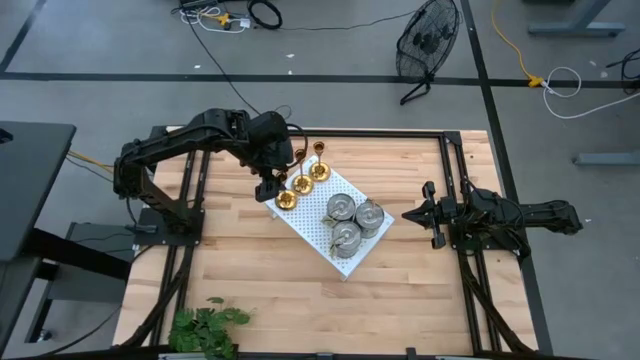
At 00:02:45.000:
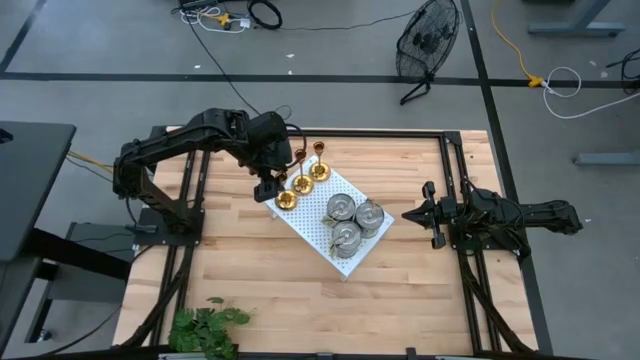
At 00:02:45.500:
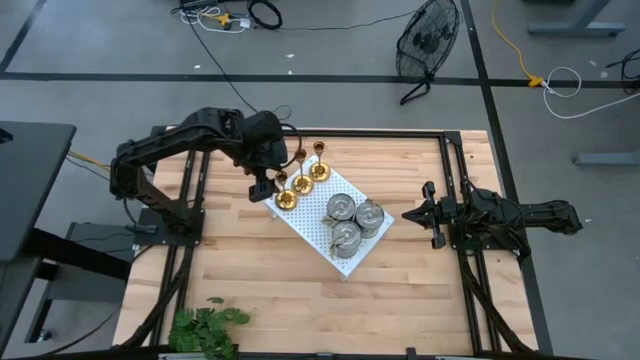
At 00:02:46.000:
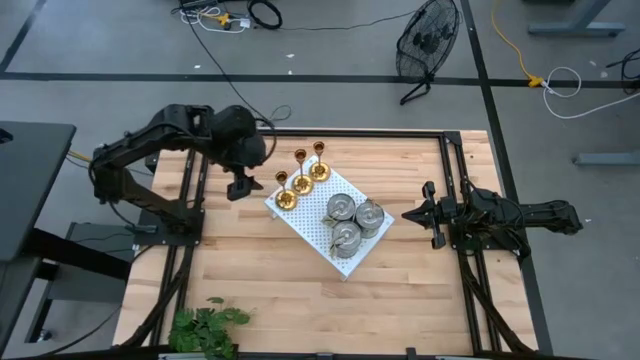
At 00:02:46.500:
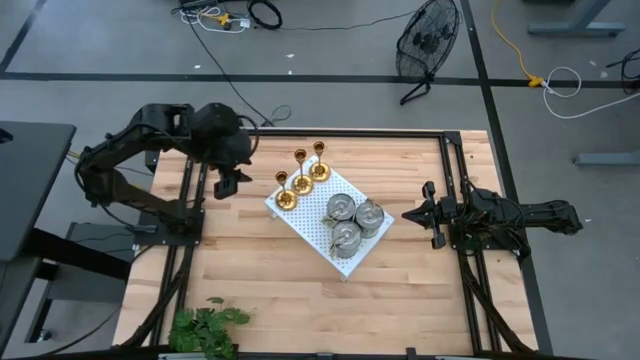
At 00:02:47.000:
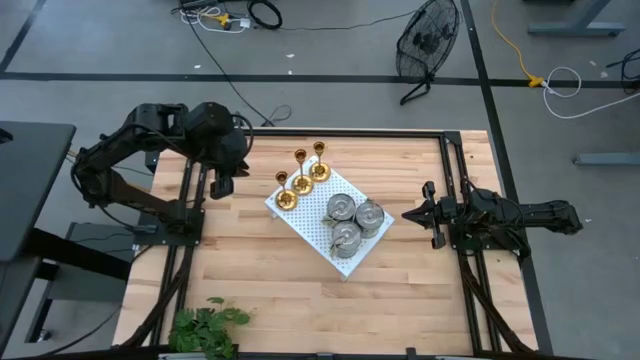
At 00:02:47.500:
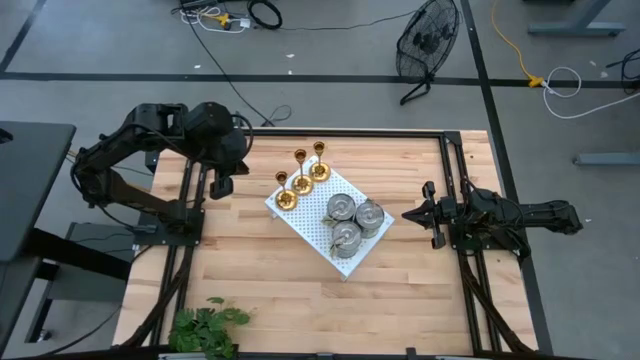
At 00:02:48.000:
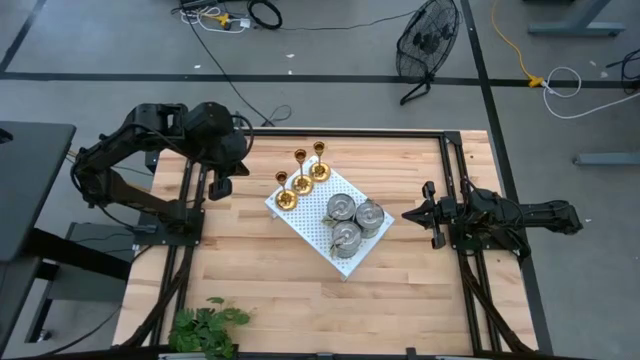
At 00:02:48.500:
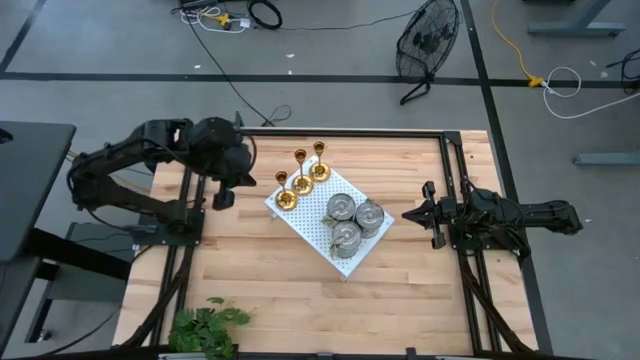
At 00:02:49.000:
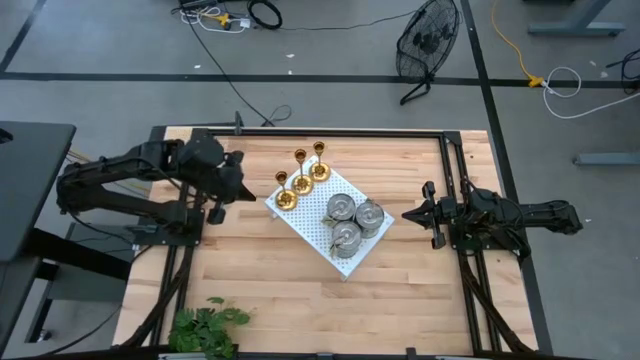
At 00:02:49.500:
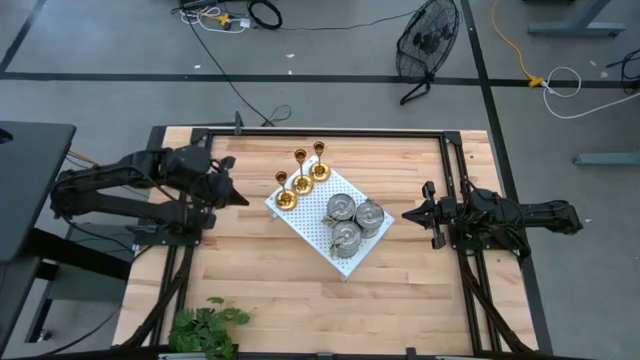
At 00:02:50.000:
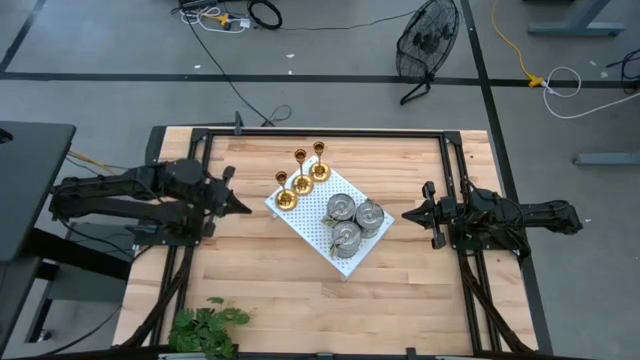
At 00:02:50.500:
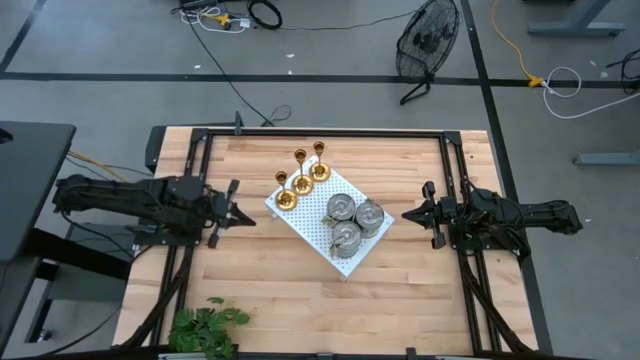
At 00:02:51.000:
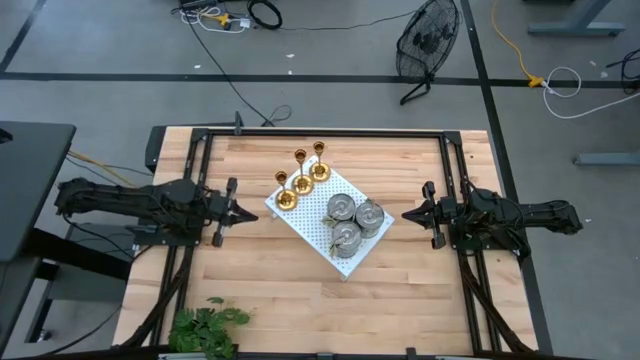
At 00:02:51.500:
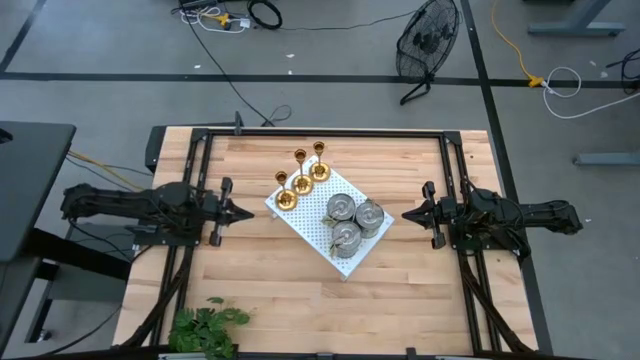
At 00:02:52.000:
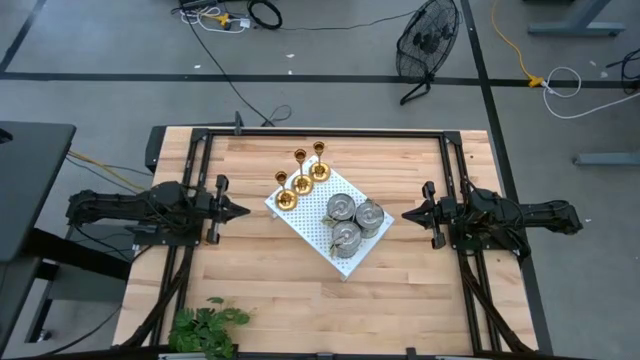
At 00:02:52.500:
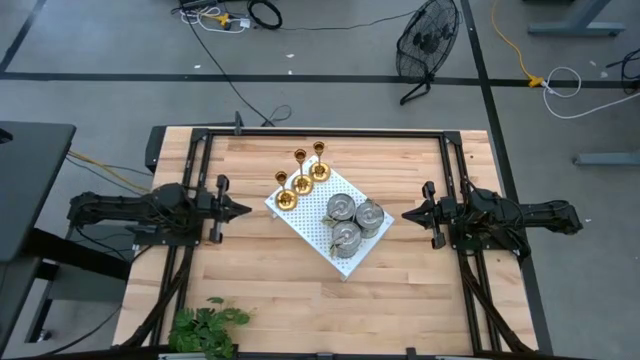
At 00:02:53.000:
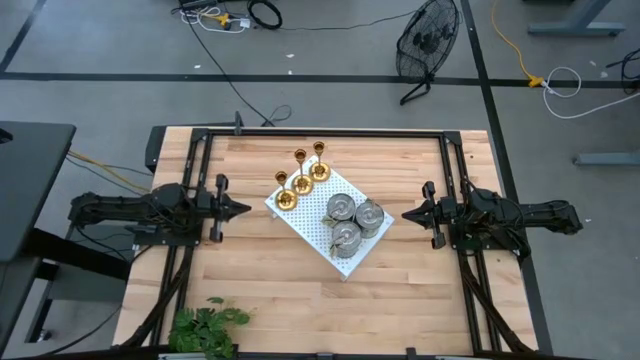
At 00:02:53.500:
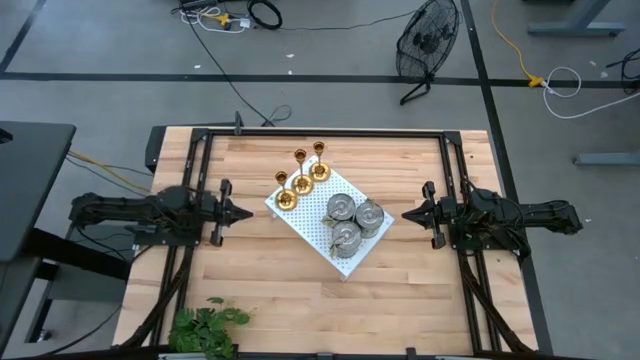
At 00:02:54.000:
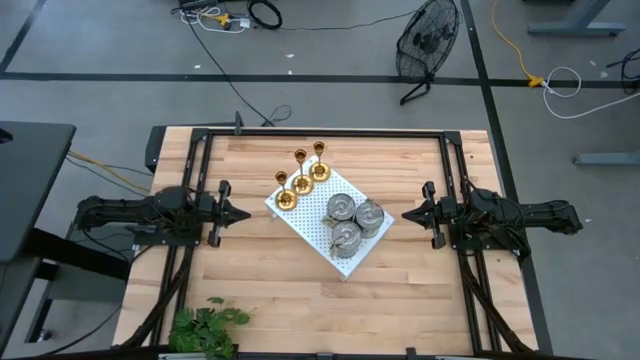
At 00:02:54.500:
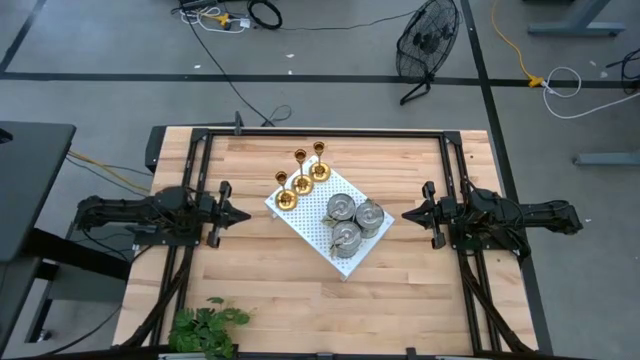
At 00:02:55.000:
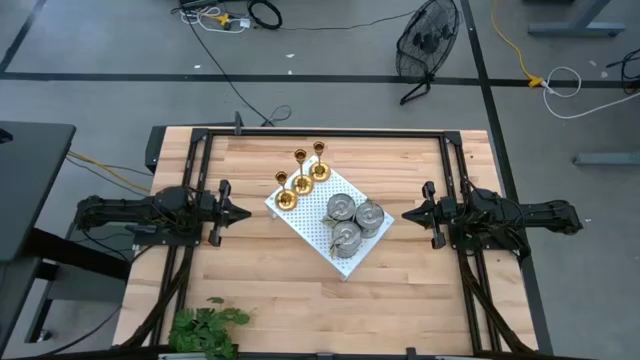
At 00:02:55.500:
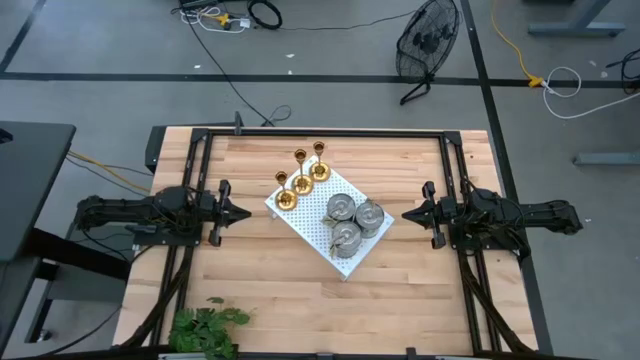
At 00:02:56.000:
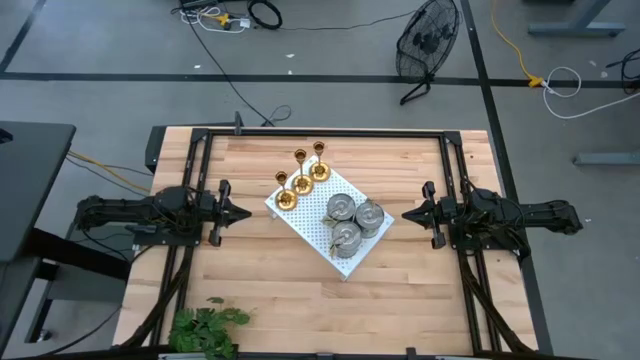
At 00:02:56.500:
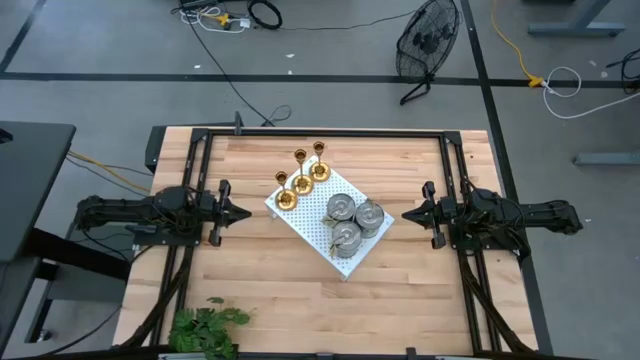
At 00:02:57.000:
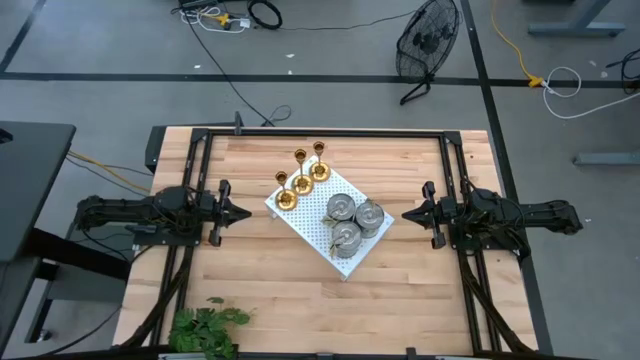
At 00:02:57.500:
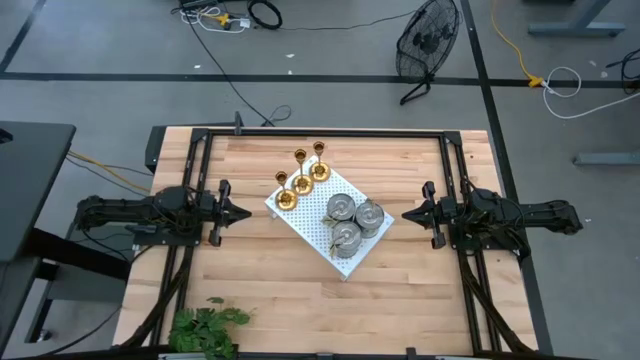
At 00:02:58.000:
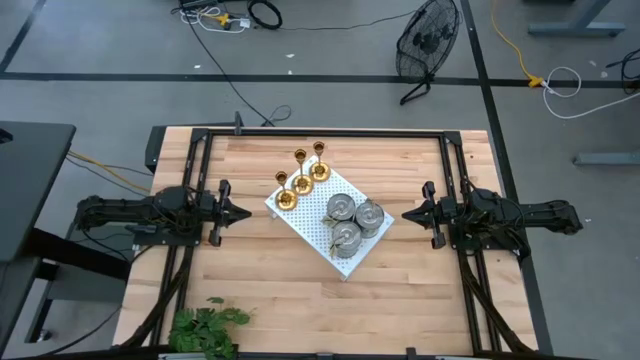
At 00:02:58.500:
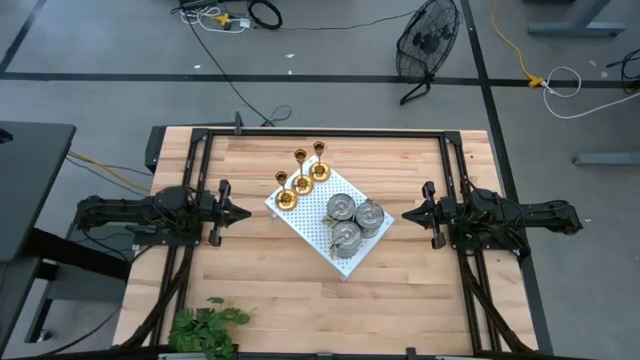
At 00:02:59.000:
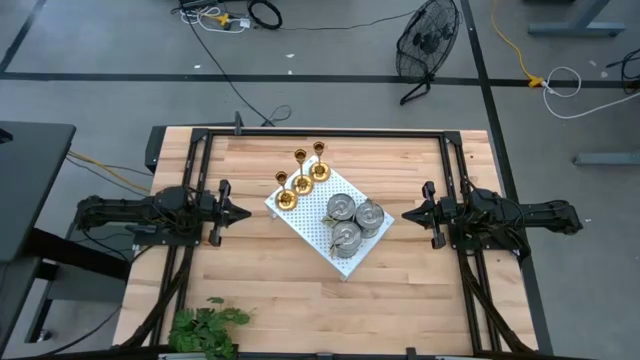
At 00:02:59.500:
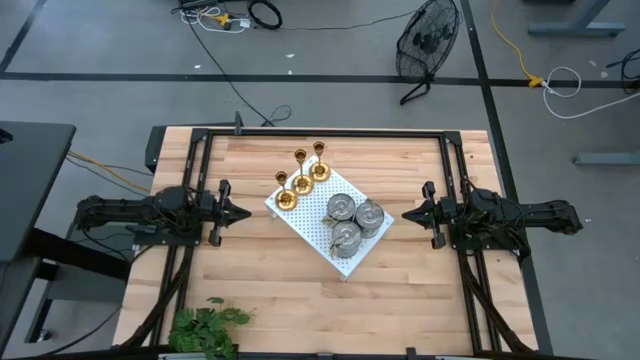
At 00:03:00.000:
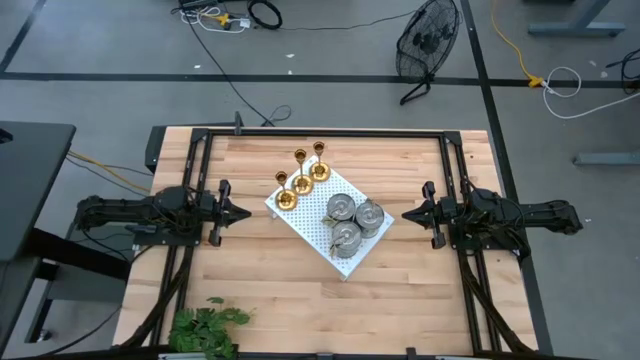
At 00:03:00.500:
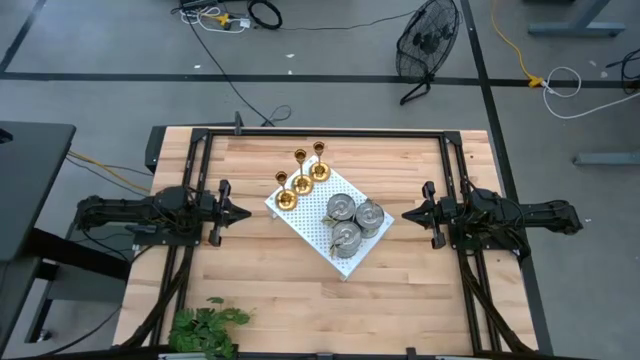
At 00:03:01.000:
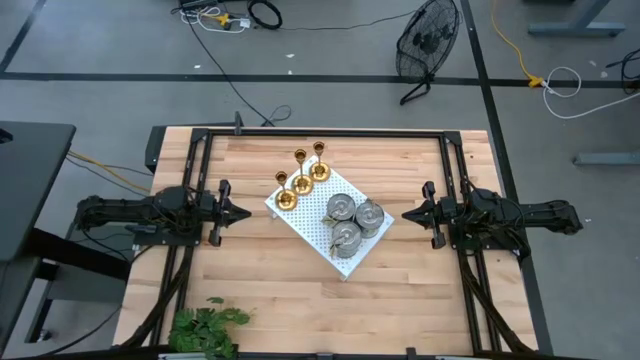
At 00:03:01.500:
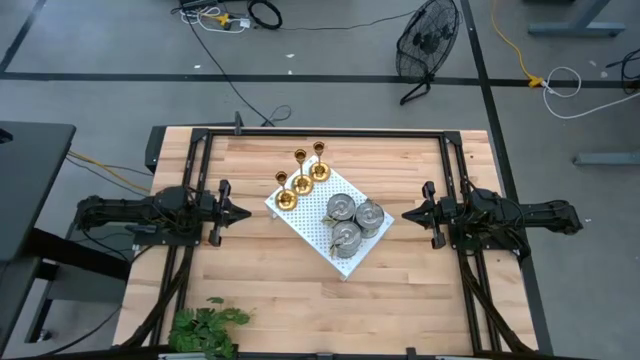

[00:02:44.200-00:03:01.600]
Task: Pick & Place candle stick holders
Return to Home Position

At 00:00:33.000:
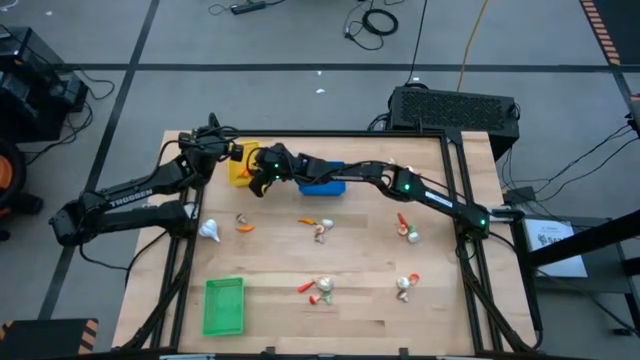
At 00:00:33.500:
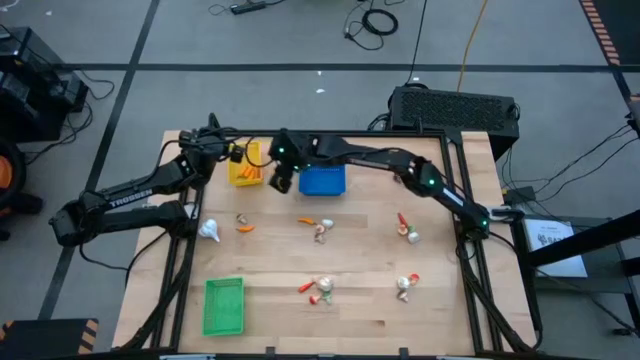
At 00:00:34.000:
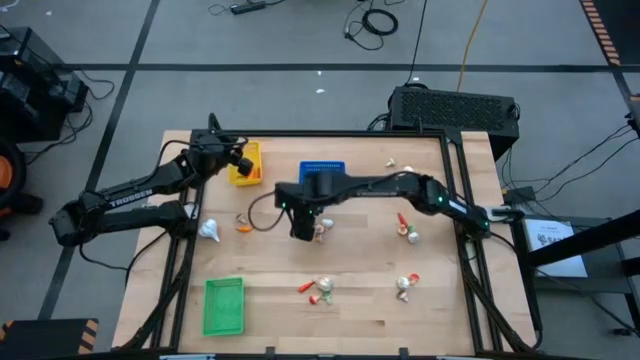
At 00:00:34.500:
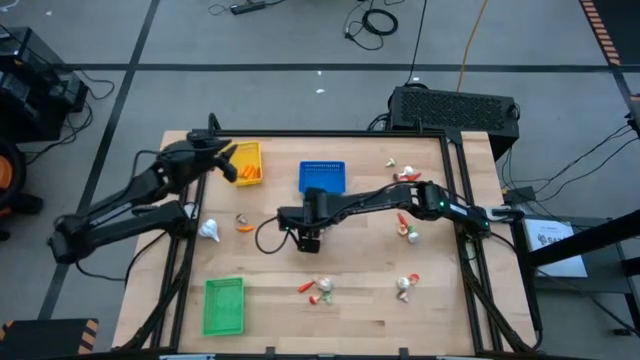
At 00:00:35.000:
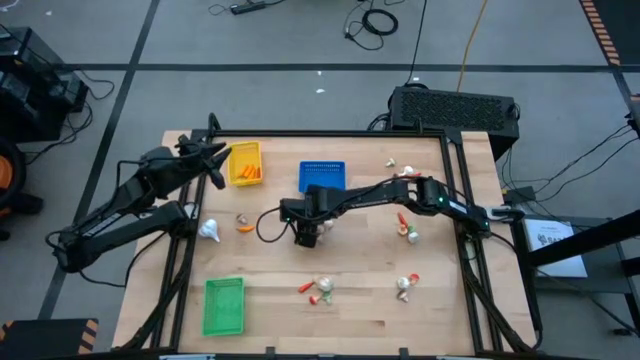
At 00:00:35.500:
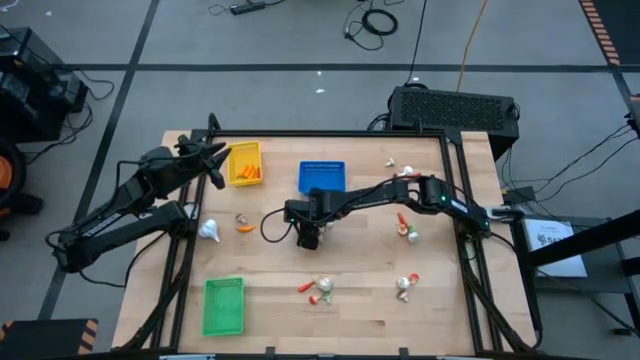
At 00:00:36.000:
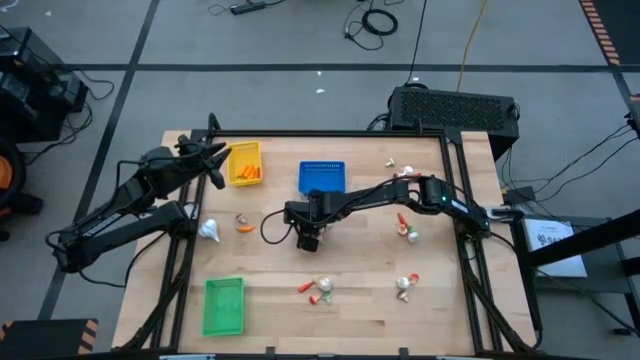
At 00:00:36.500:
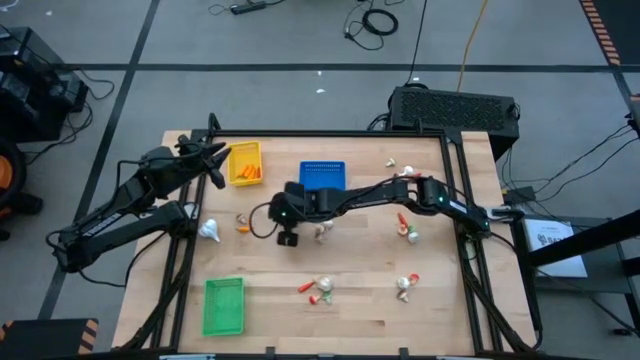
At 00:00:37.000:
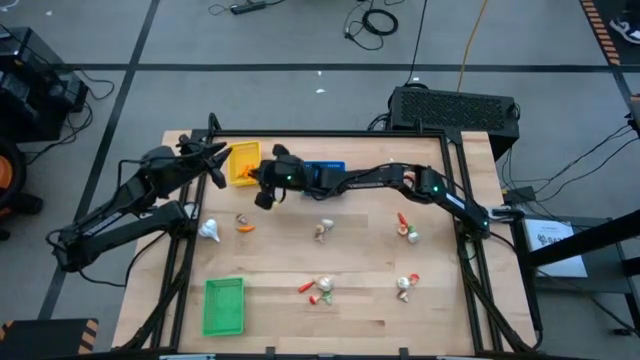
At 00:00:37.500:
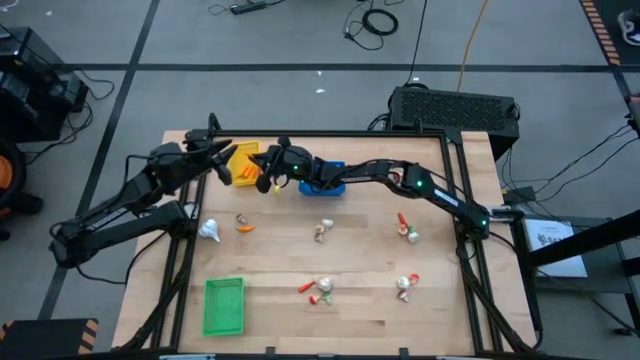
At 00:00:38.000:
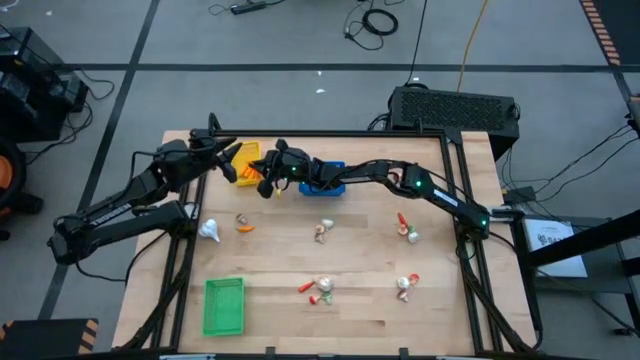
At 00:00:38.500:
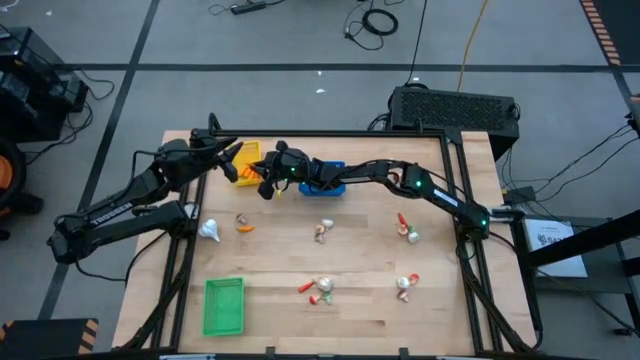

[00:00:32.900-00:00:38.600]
Task: Sort produce into baskets
Put the yellow chili pepper into the yellow bin
